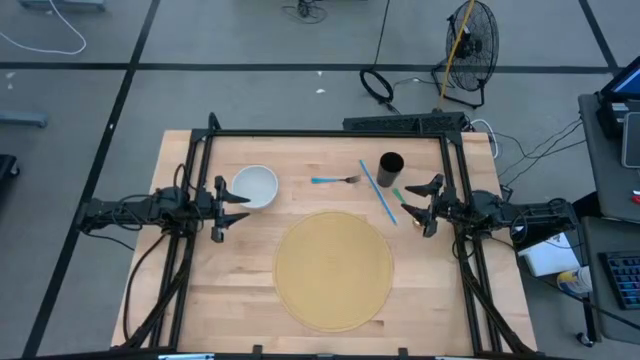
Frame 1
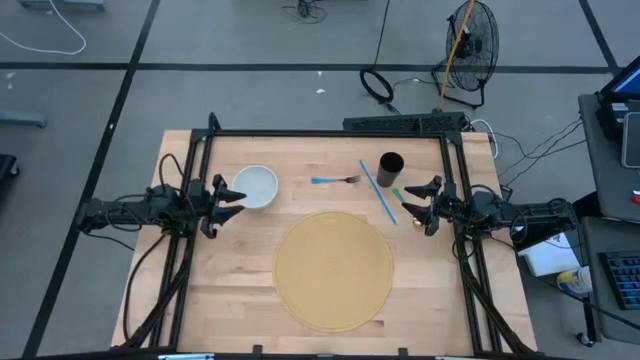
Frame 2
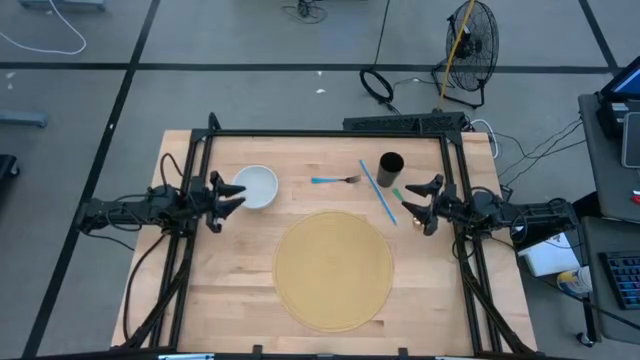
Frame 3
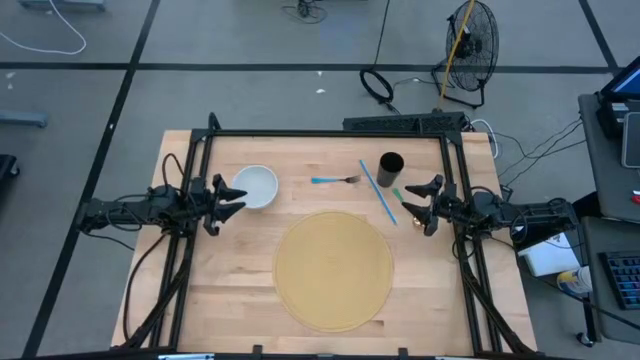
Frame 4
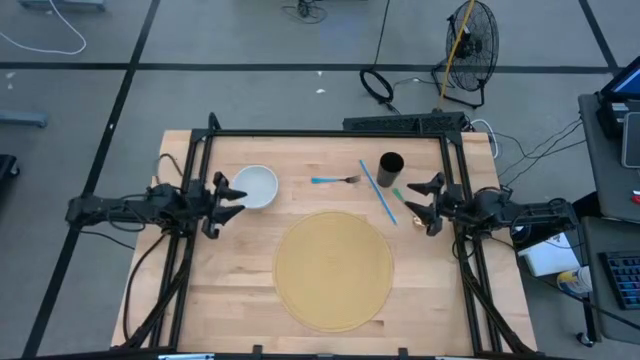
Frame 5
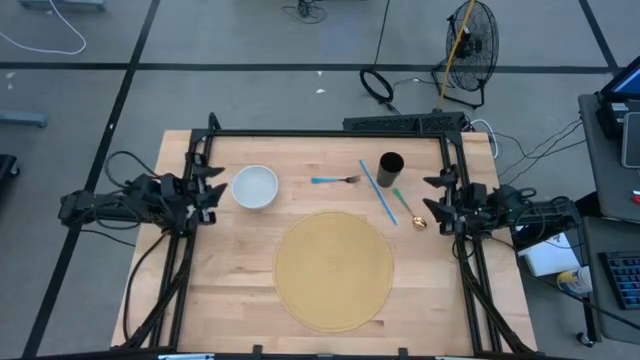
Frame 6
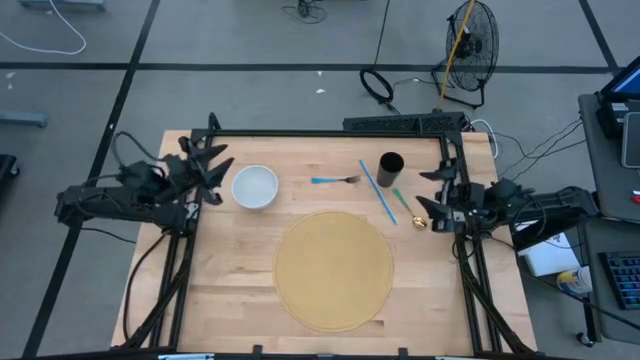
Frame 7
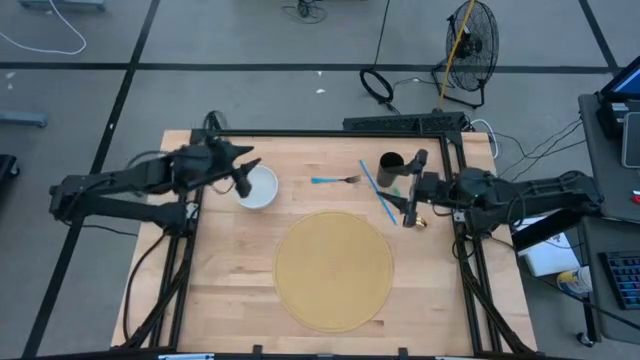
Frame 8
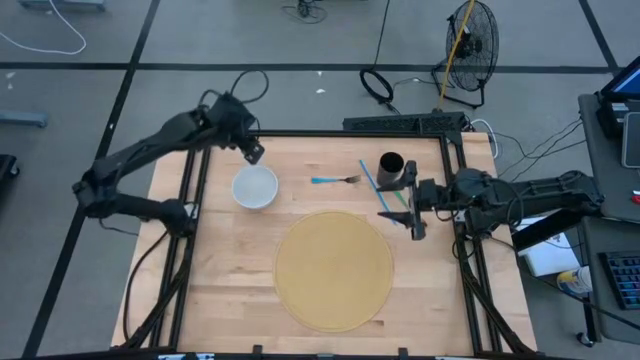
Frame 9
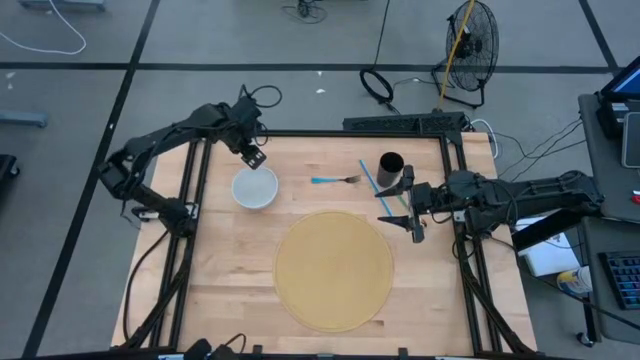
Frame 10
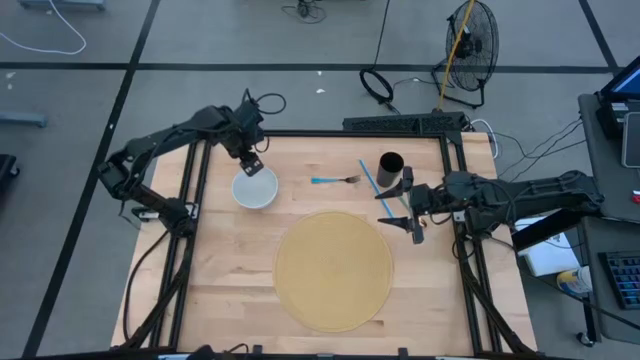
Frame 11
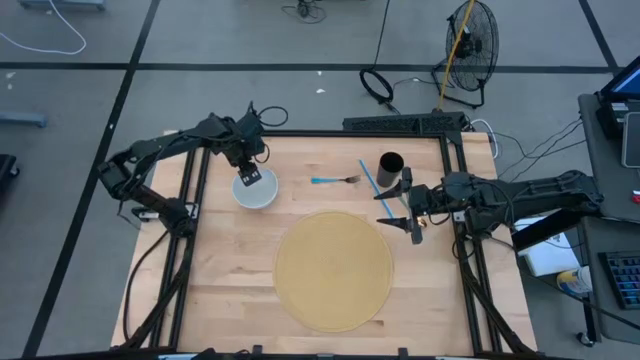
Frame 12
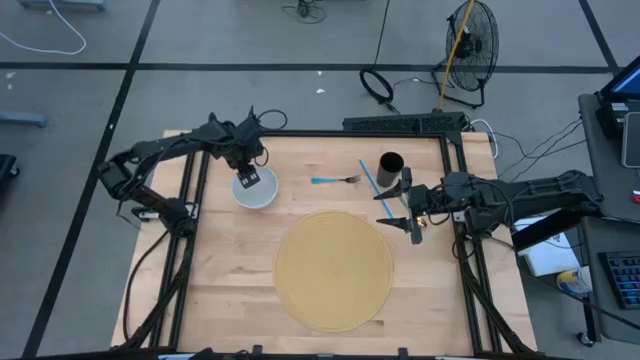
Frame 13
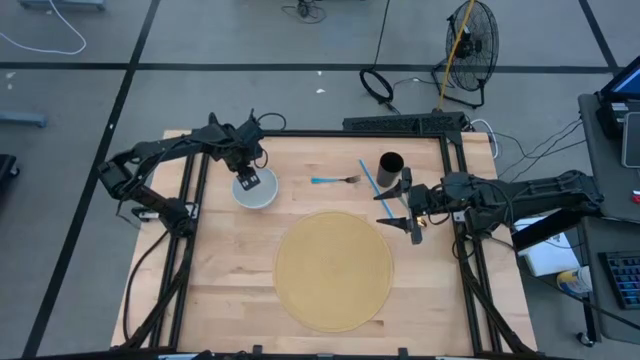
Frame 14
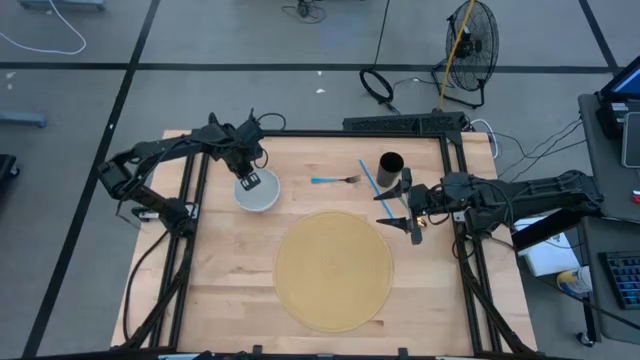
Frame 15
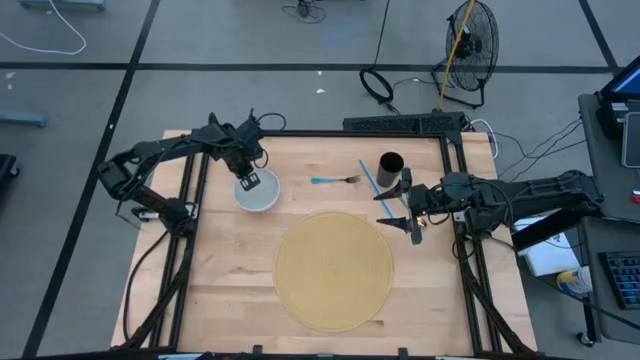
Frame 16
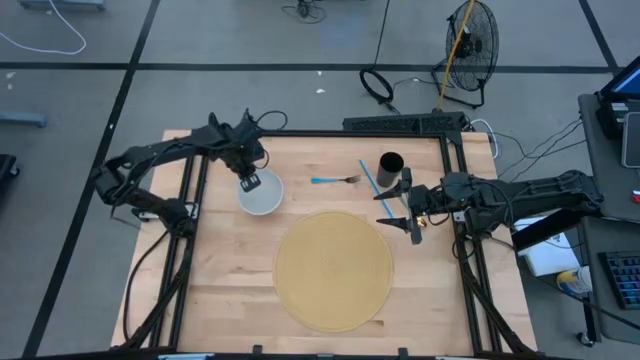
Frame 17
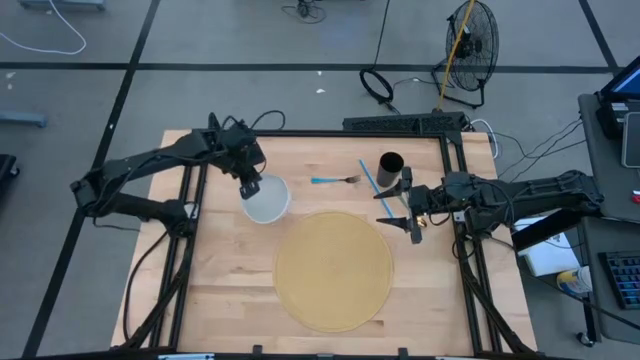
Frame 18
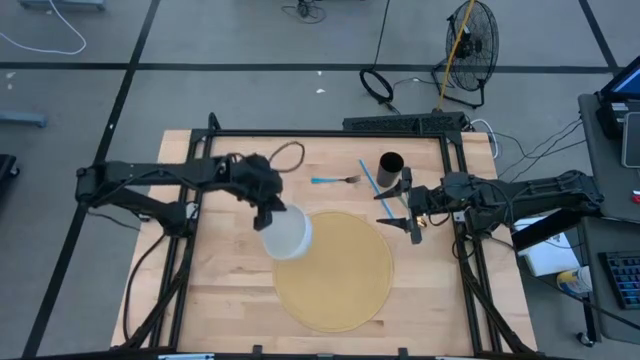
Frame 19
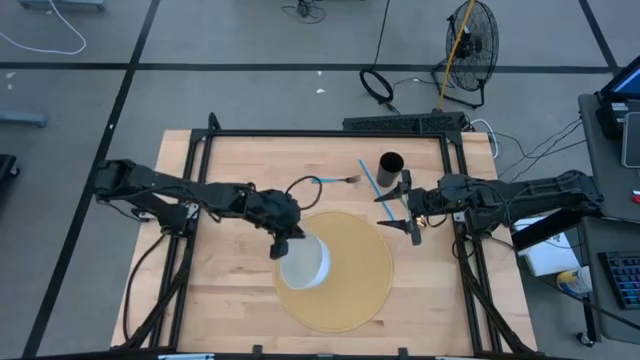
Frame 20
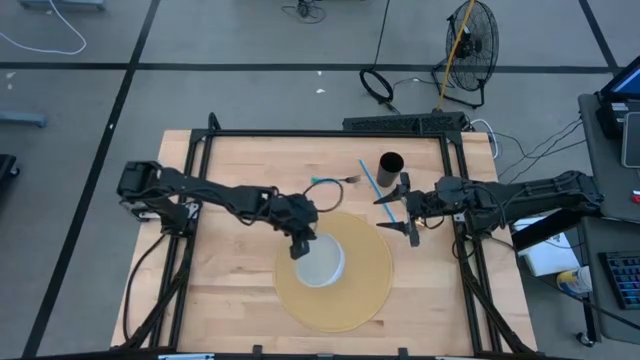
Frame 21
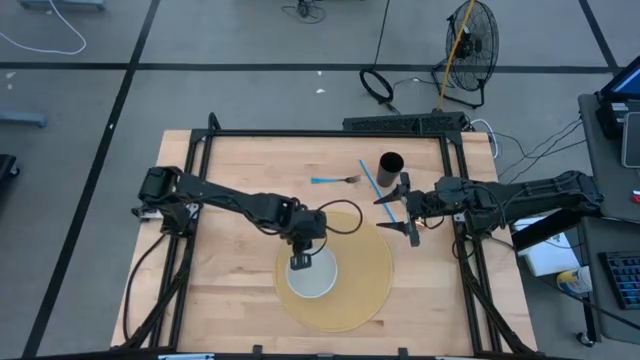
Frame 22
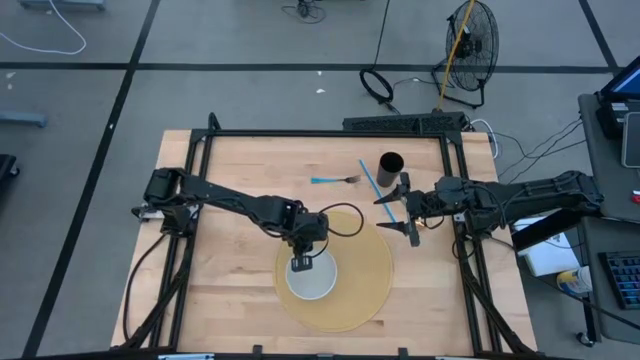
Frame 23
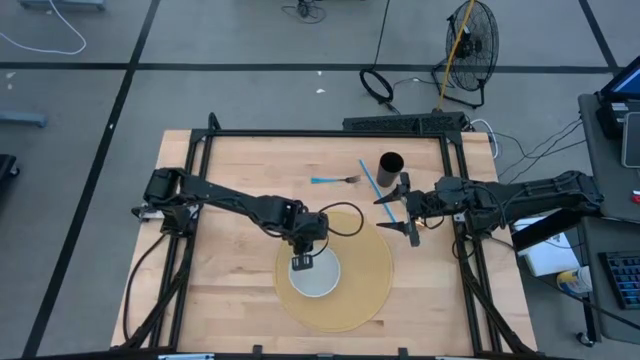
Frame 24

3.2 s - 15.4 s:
Task: Pick & Place Utensil
Put the white bowl on the tablemat
